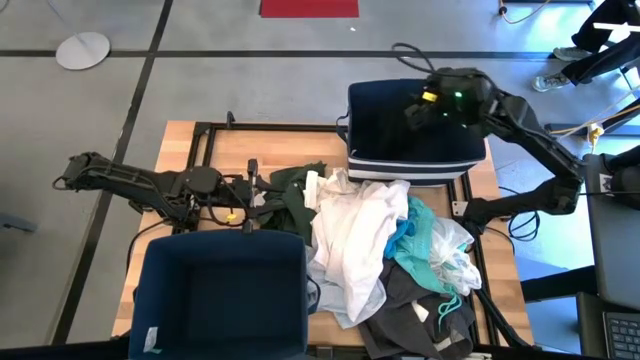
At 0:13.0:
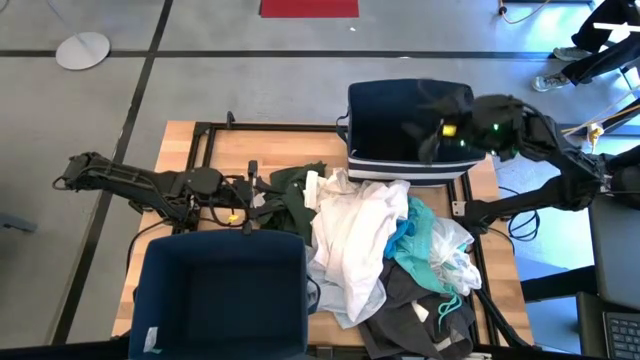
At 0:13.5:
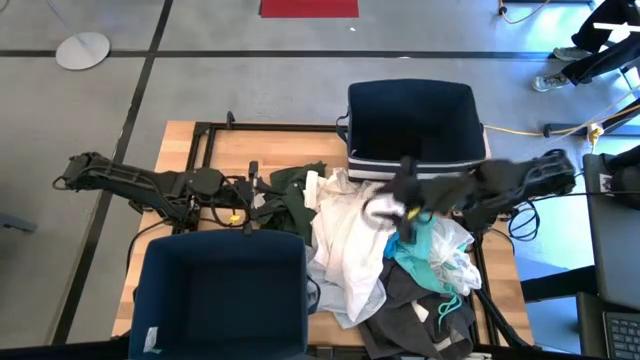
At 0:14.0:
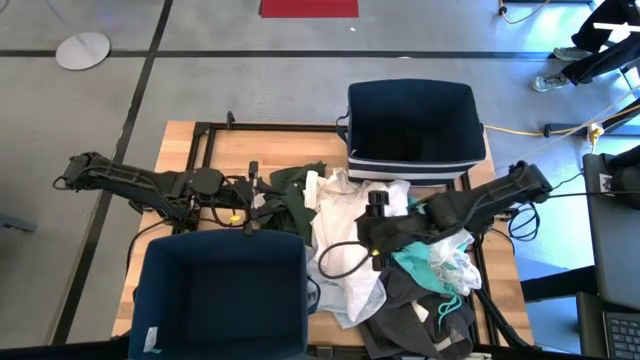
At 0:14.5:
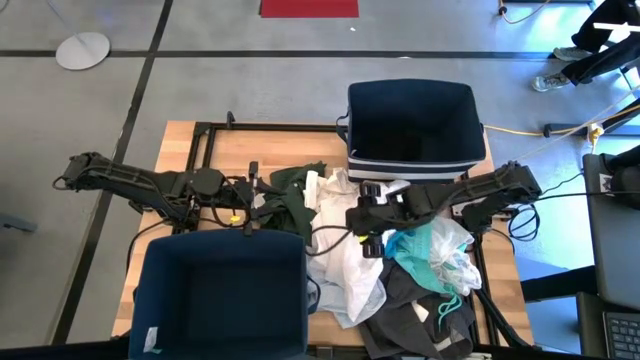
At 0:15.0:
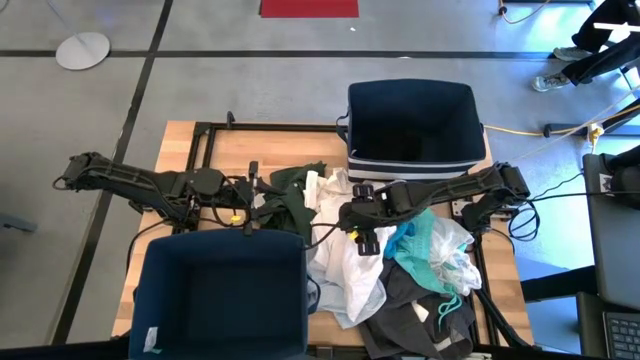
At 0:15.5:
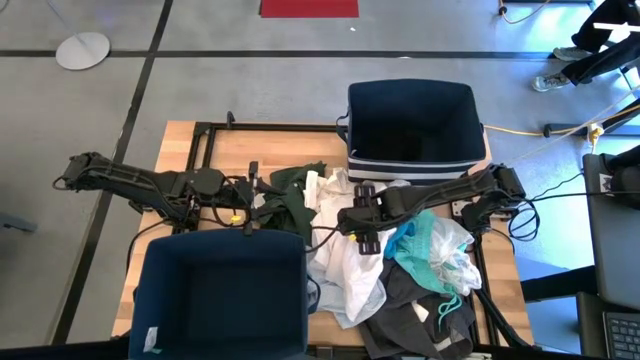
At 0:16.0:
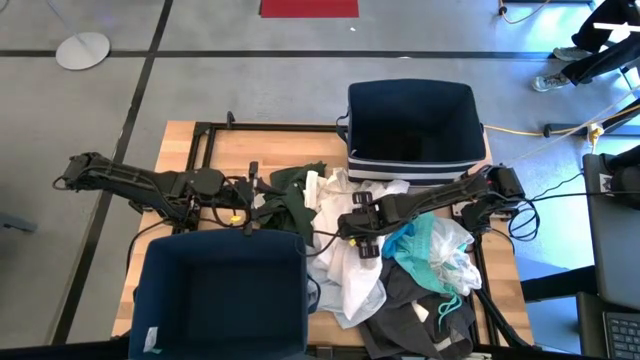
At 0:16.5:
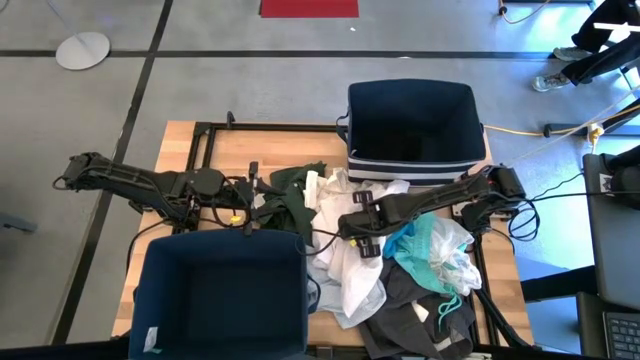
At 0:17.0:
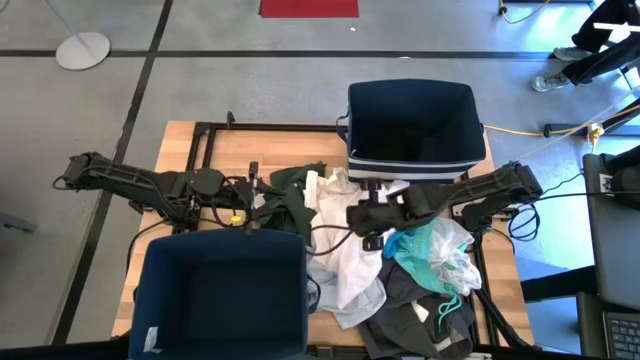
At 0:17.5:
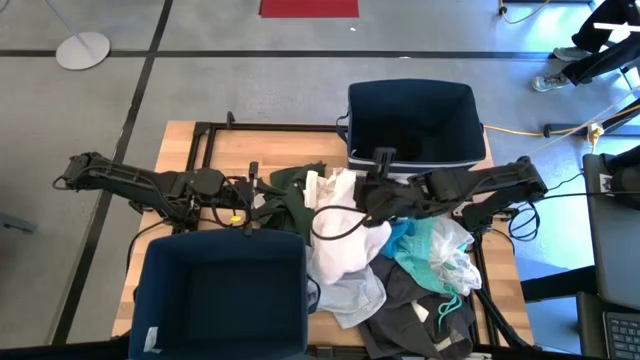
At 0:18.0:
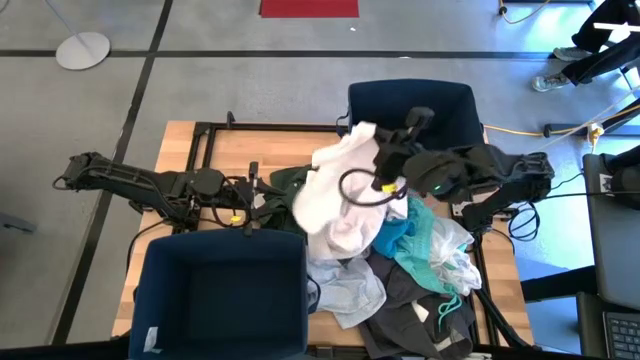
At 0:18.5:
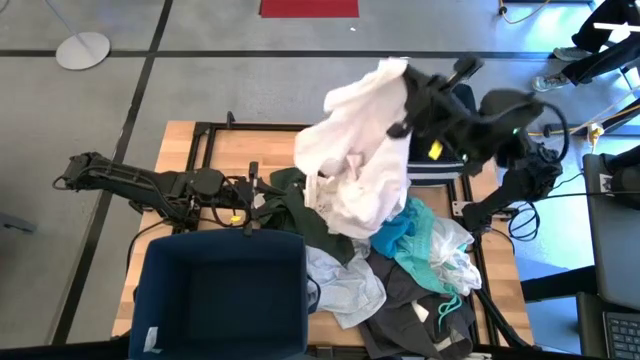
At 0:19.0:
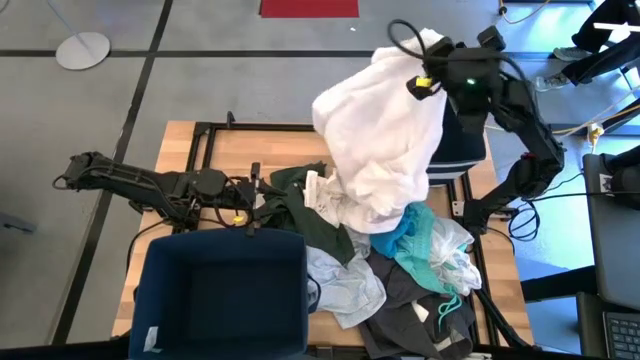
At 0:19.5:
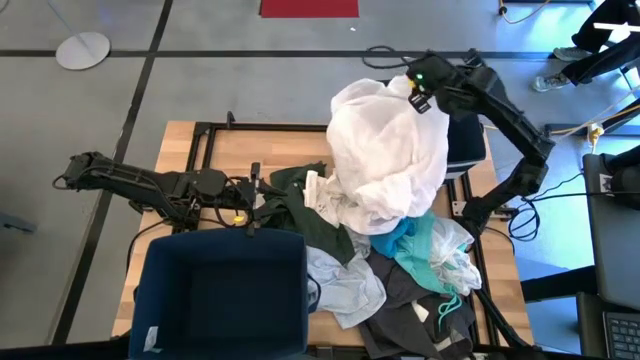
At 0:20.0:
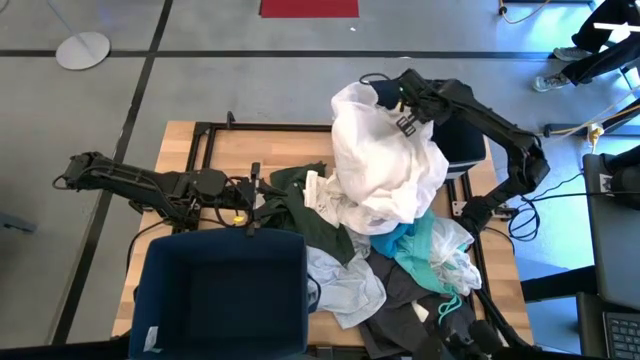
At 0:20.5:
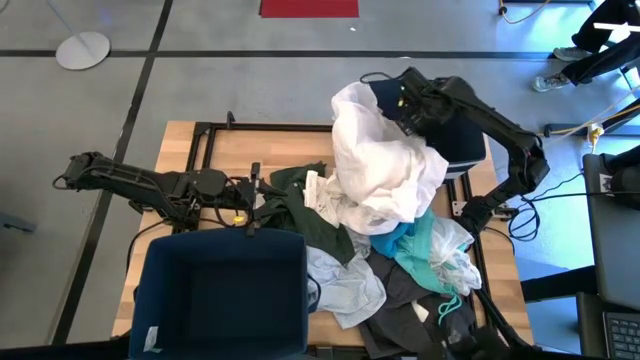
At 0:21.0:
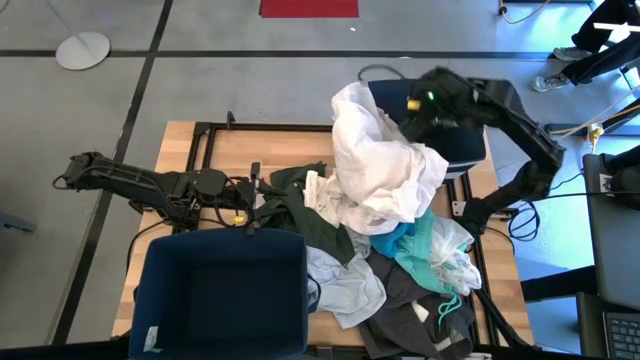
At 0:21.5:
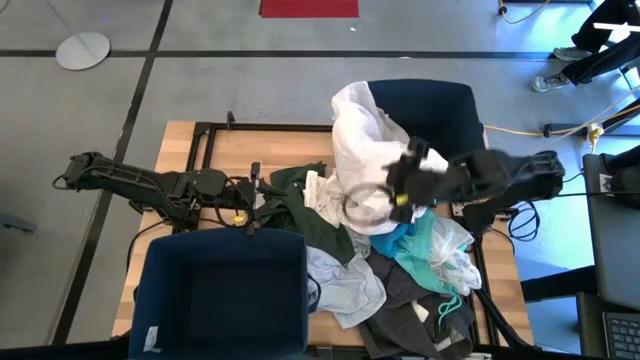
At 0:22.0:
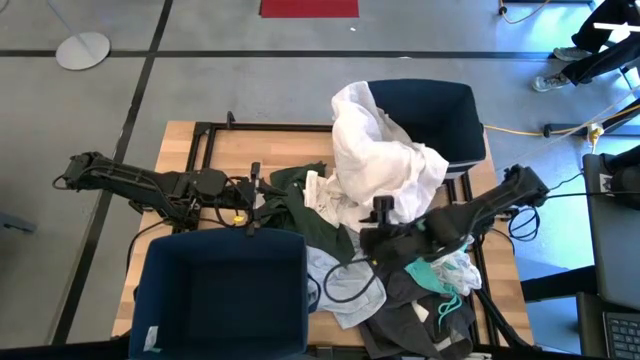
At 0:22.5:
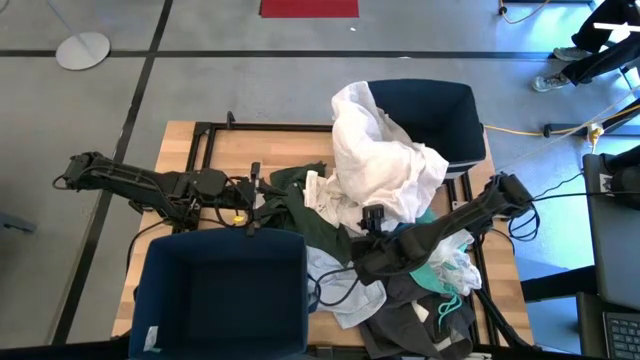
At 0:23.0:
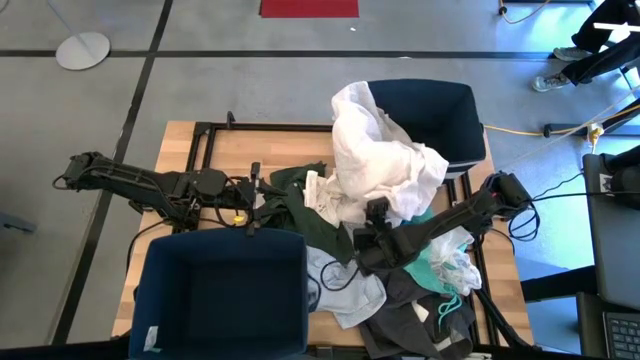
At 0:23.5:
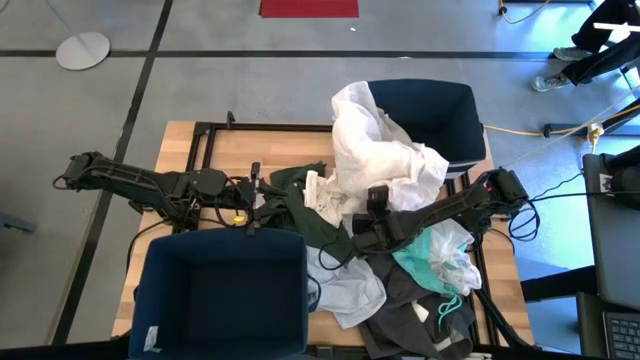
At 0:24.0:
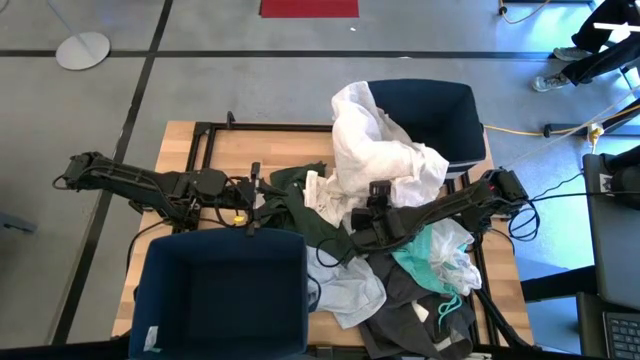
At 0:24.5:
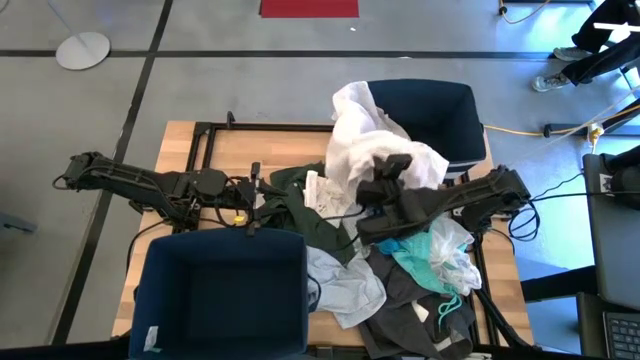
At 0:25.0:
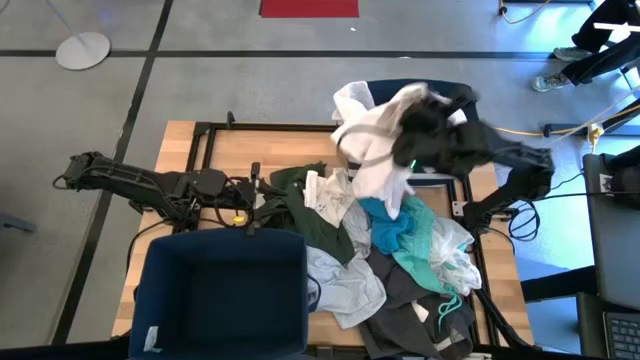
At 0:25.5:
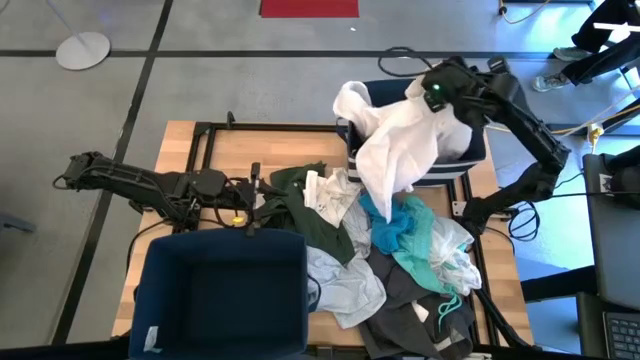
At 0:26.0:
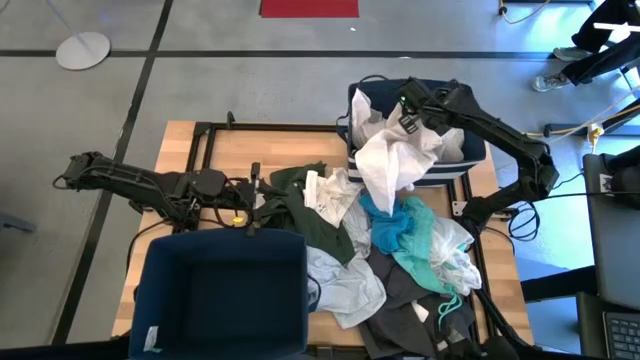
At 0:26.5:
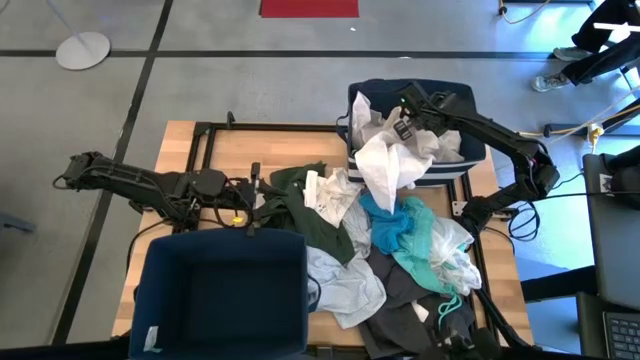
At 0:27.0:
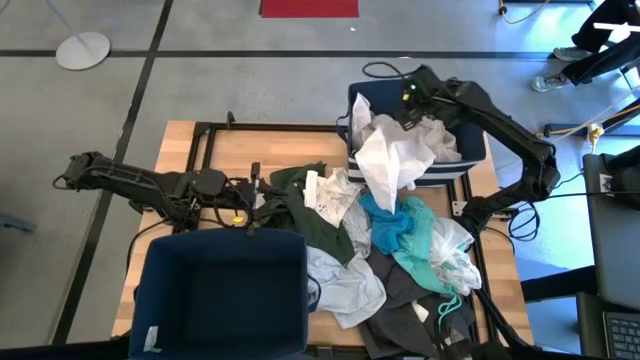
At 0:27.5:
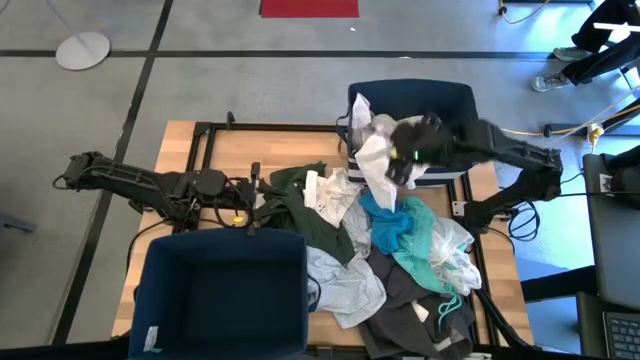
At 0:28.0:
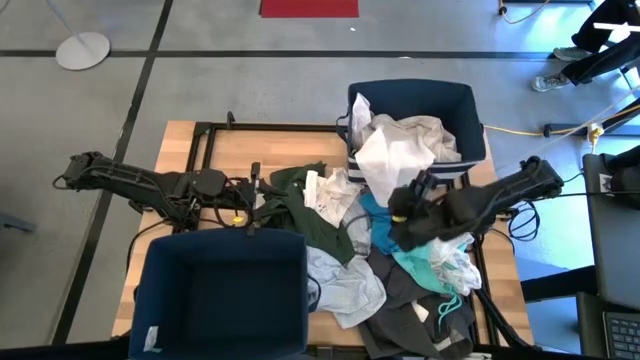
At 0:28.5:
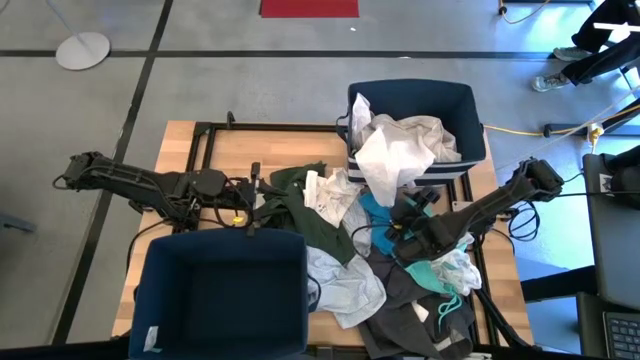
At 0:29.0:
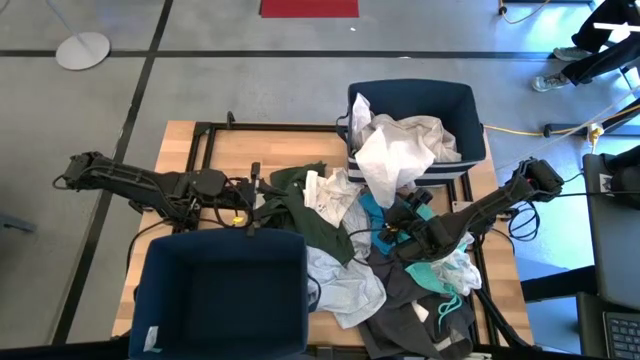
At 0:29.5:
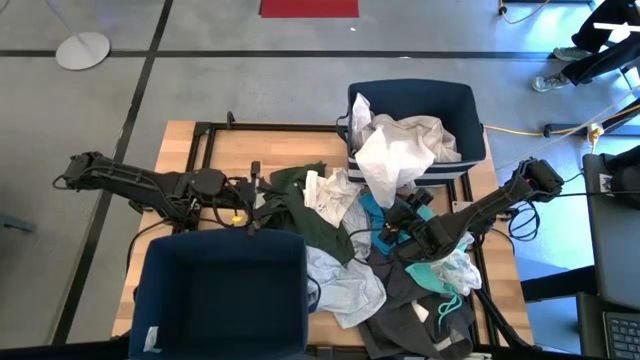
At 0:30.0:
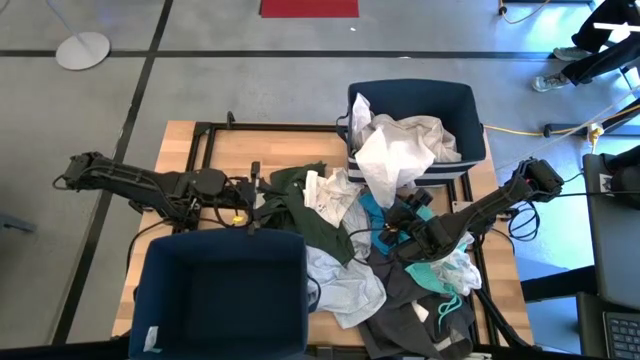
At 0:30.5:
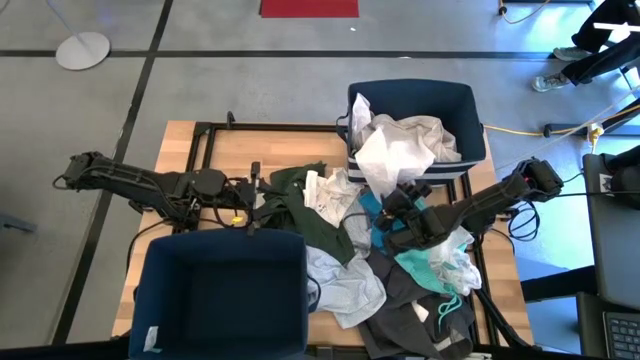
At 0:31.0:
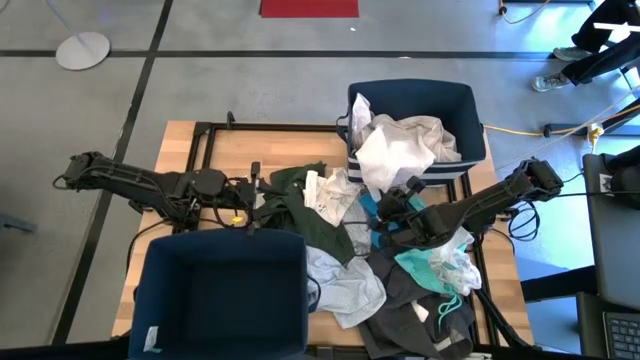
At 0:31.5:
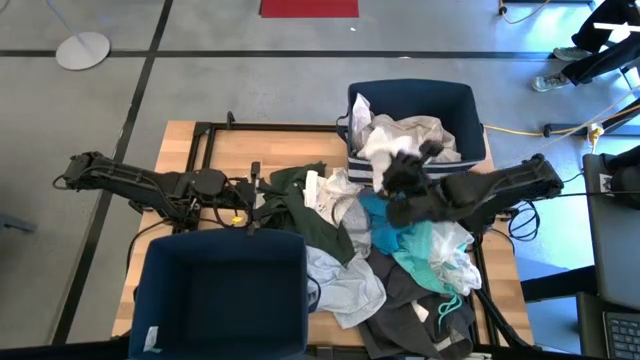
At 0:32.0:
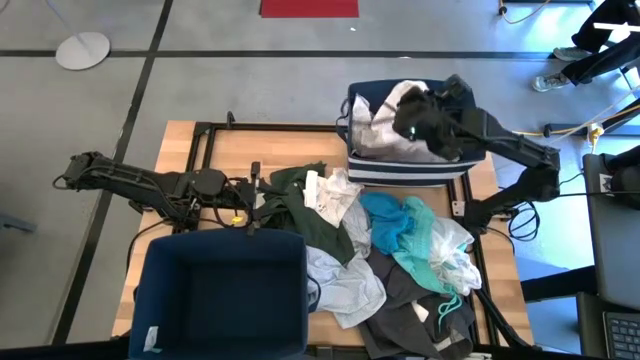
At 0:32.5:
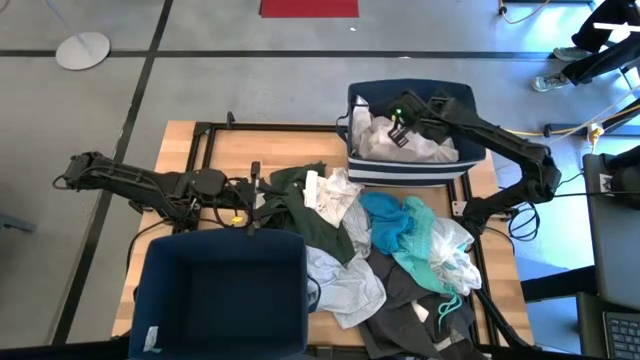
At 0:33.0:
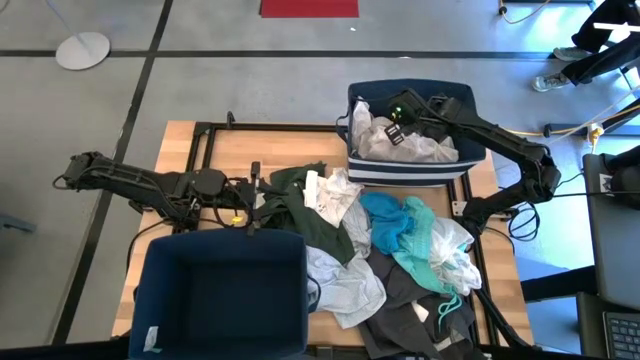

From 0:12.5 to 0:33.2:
Task: Sort clothes
Put the white polo shirt into the top laundry bin
